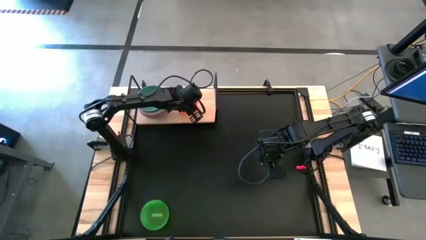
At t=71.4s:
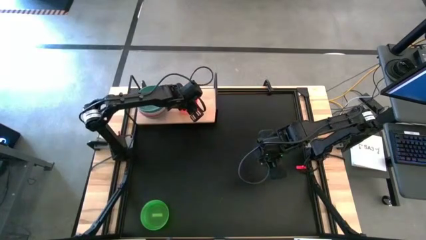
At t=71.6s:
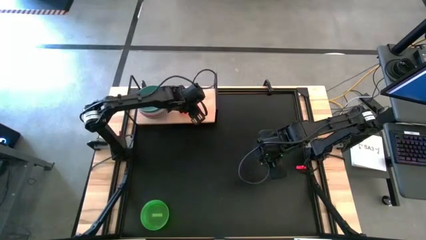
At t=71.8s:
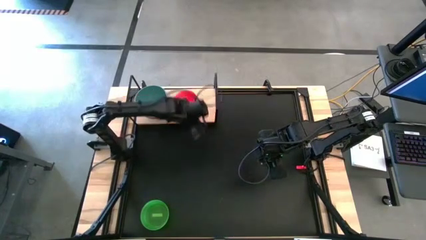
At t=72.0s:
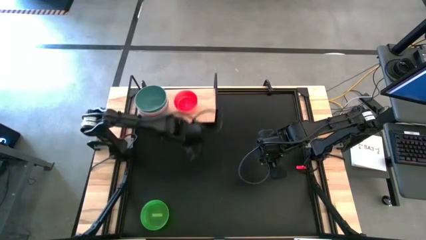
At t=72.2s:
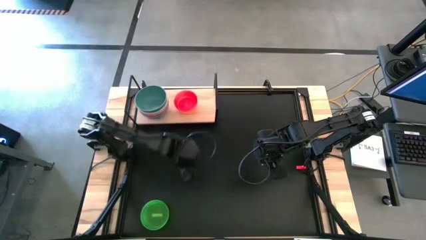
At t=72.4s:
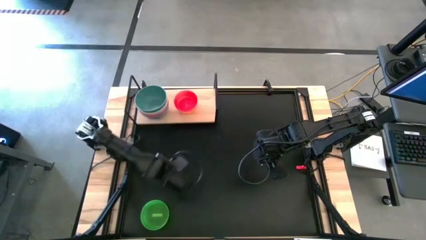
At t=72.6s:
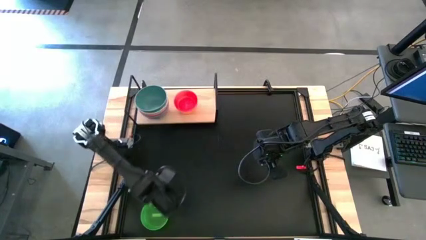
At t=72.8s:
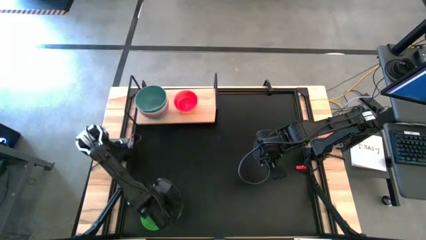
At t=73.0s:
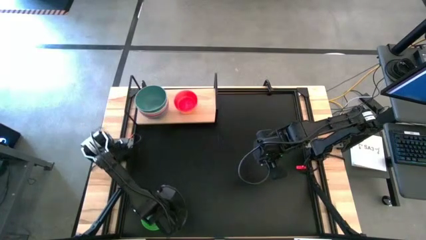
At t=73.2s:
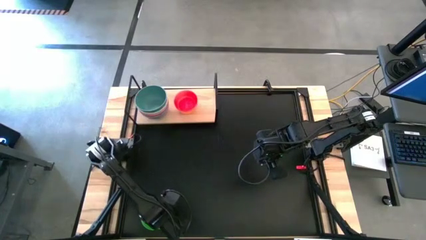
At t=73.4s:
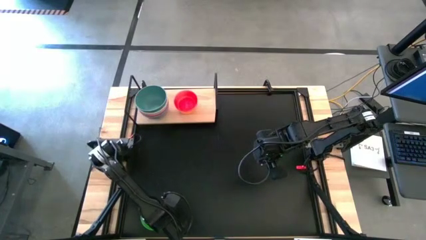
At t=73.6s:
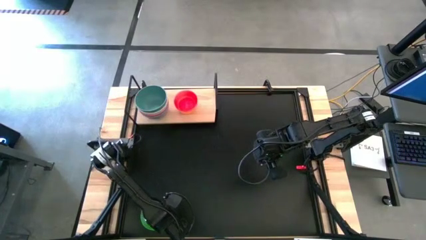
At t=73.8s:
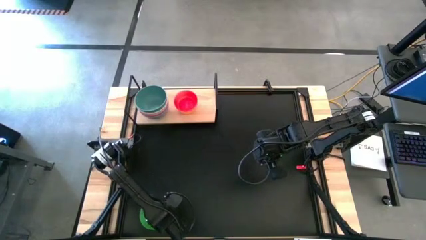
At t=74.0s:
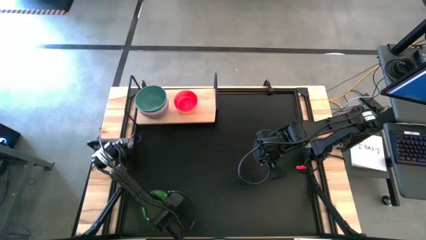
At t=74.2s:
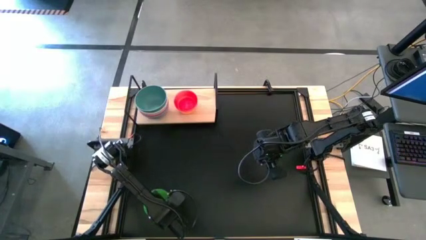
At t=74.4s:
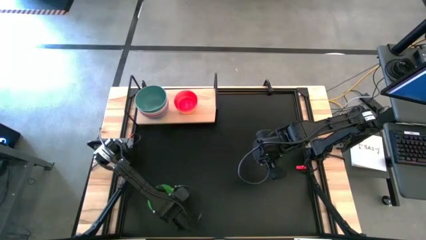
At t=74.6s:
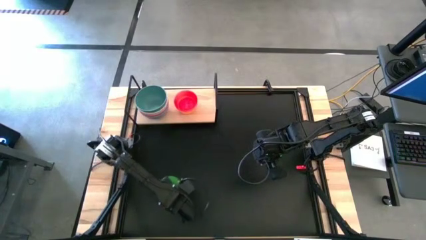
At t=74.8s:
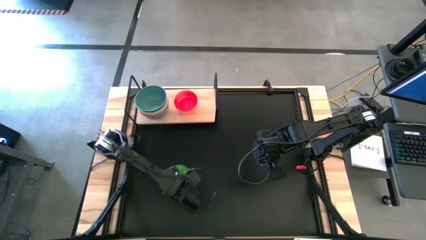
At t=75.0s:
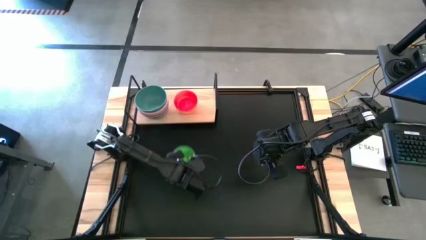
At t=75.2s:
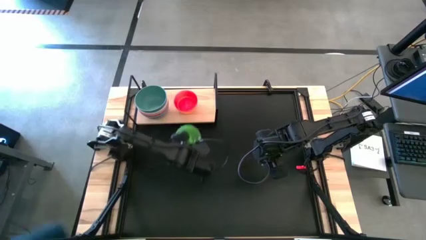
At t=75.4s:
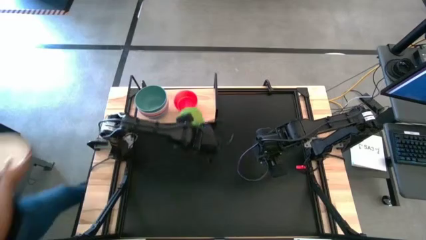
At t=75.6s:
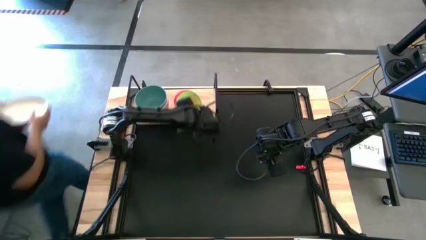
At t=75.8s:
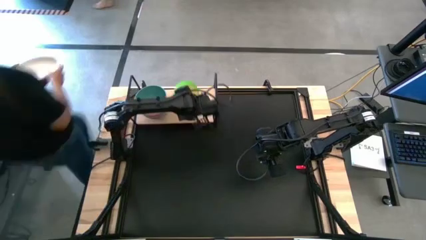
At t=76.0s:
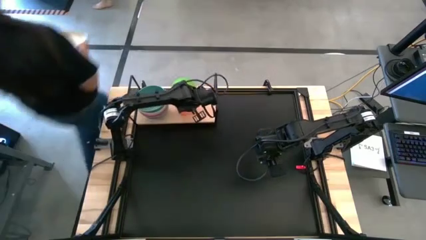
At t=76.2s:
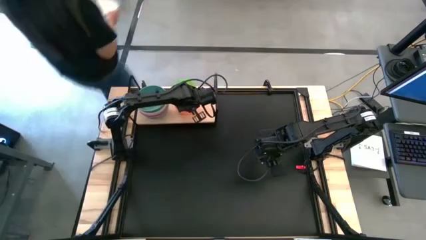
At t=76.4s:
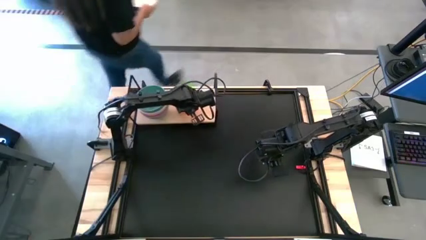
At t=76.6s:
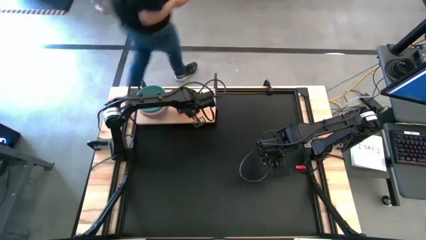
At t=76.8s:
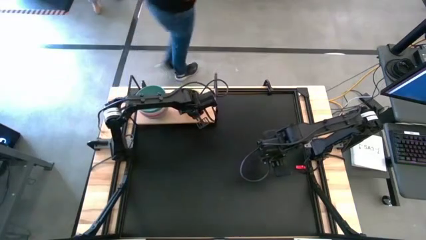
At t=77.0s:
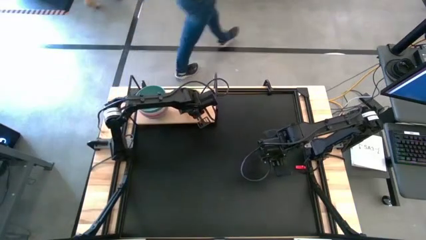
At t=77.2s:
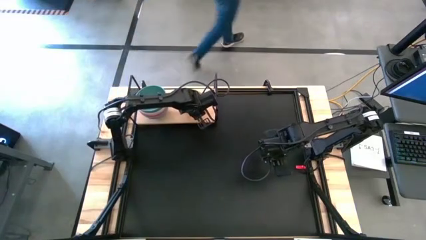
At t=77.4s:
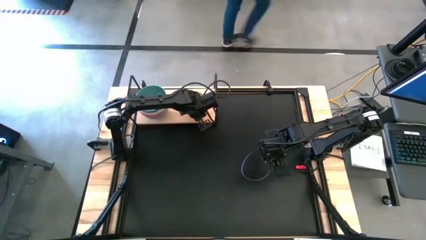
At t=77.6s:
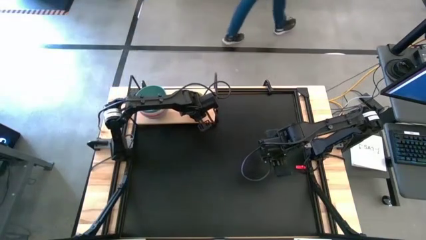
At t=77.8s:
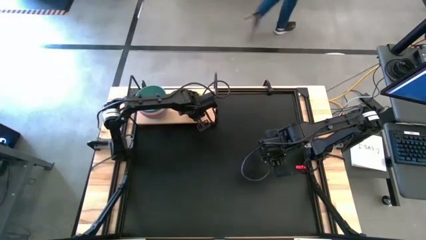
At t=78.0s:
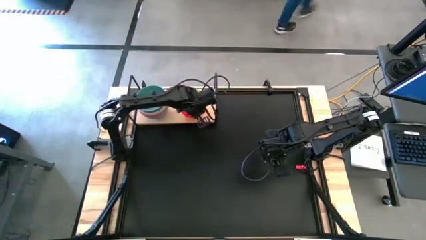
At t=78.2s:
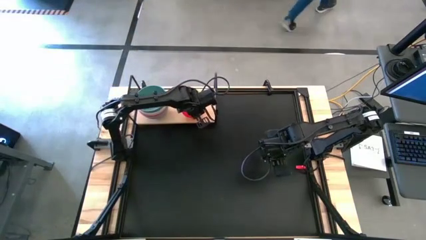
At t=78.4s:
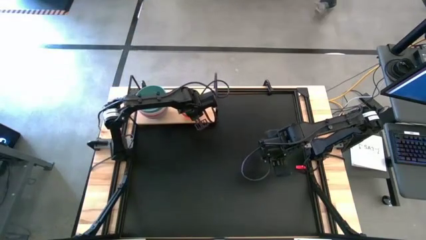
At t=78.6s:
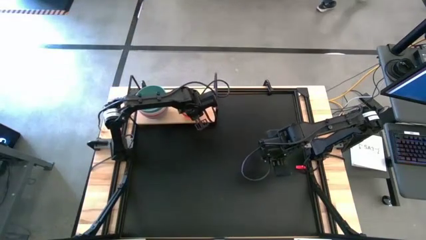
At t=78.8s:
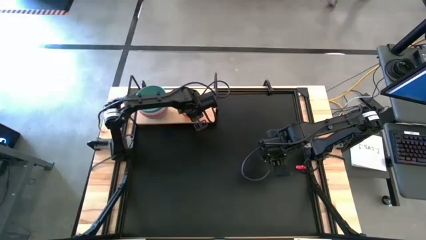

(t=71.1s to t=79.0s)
Task: Place and stack bowls onto a shelf
Stack the green bowl on top of the red bowl on the shelf

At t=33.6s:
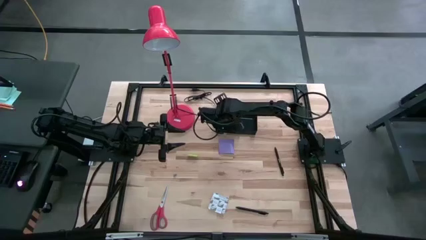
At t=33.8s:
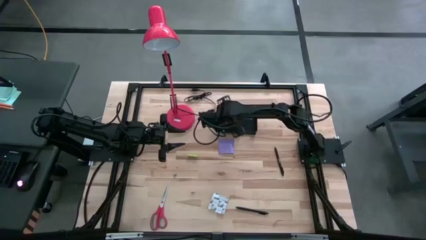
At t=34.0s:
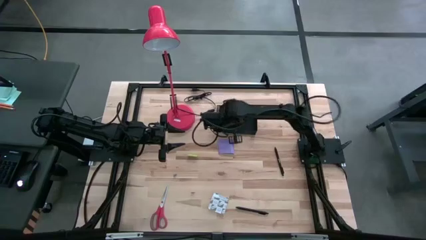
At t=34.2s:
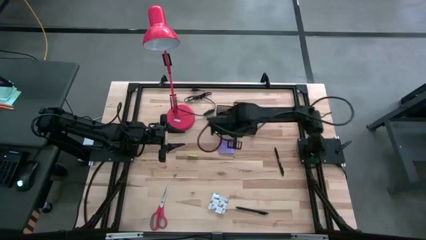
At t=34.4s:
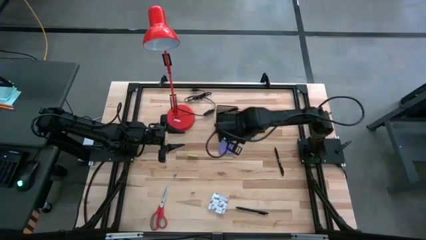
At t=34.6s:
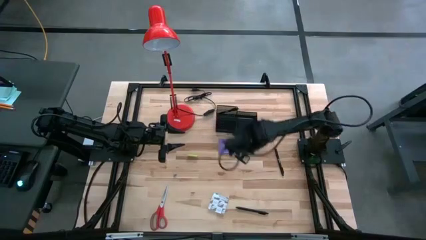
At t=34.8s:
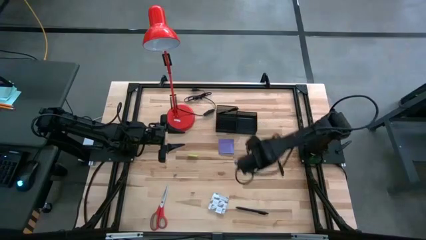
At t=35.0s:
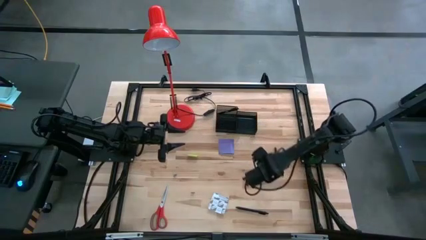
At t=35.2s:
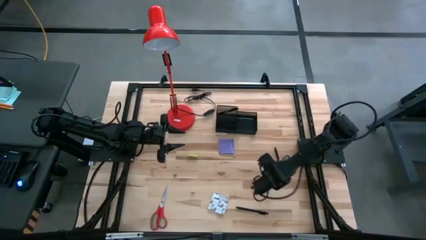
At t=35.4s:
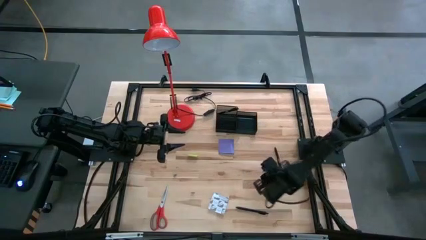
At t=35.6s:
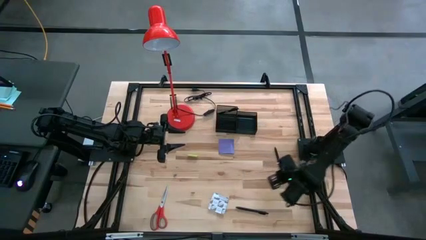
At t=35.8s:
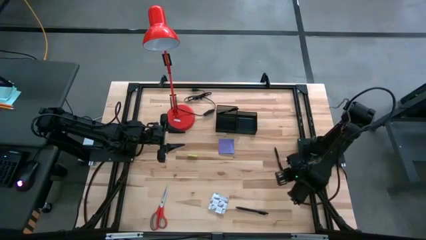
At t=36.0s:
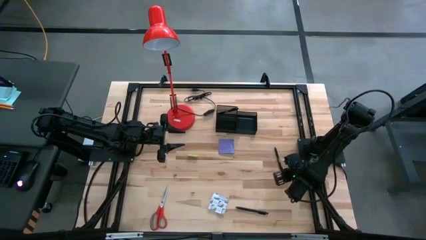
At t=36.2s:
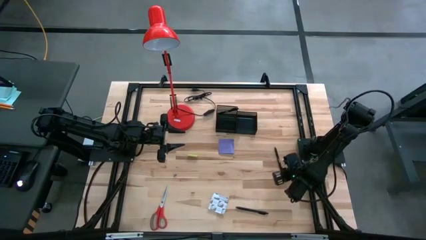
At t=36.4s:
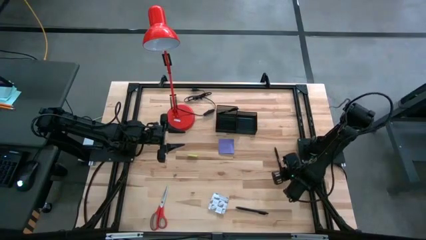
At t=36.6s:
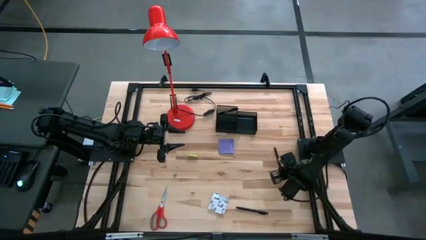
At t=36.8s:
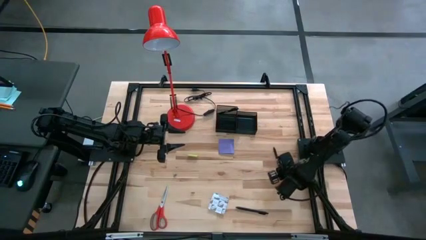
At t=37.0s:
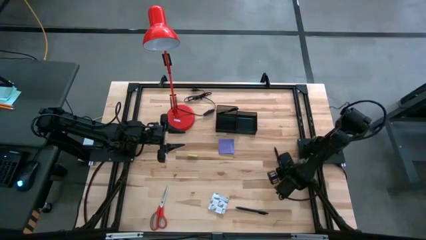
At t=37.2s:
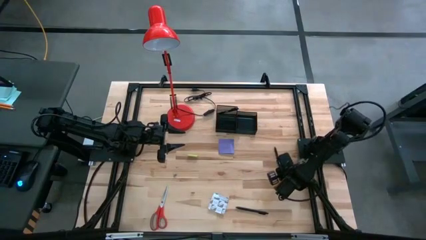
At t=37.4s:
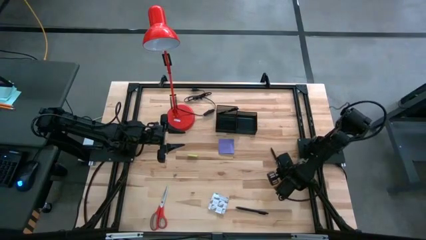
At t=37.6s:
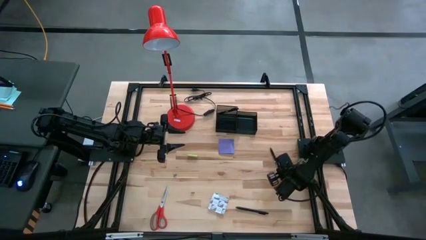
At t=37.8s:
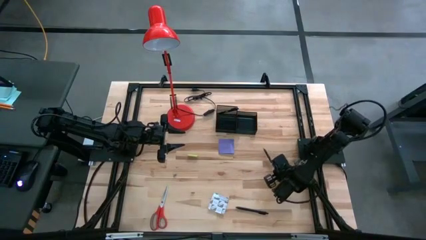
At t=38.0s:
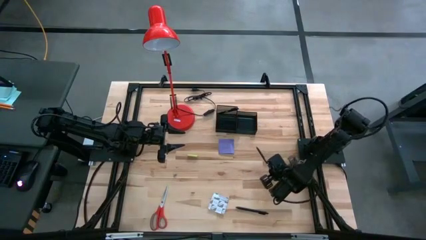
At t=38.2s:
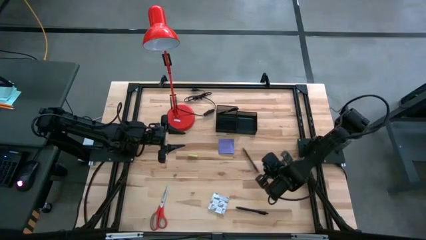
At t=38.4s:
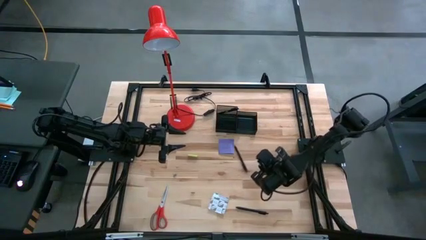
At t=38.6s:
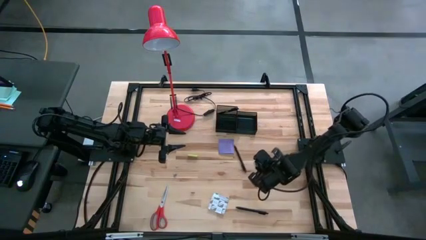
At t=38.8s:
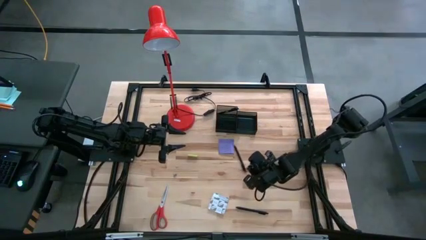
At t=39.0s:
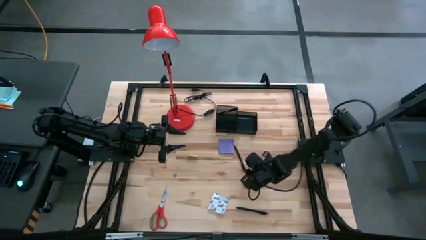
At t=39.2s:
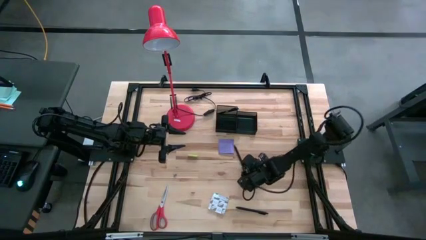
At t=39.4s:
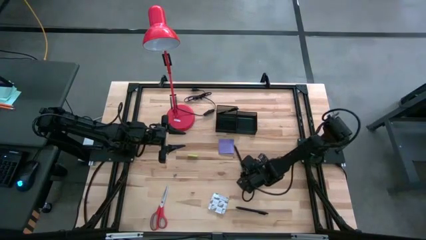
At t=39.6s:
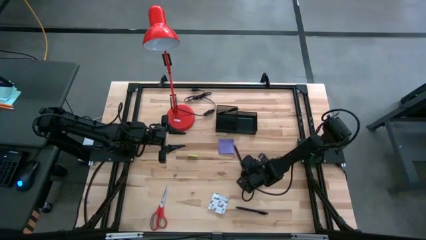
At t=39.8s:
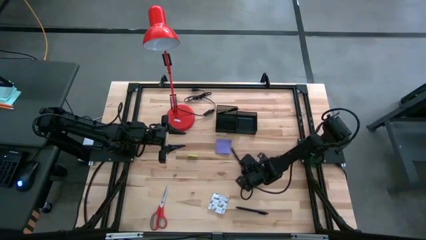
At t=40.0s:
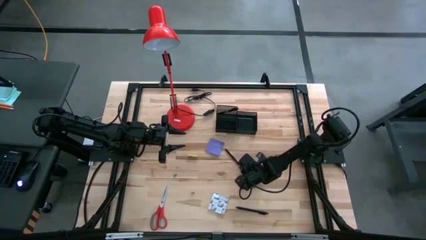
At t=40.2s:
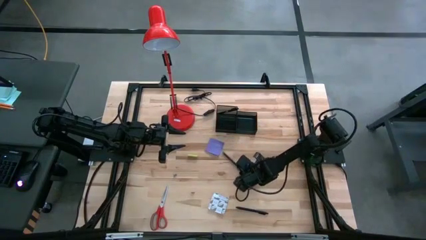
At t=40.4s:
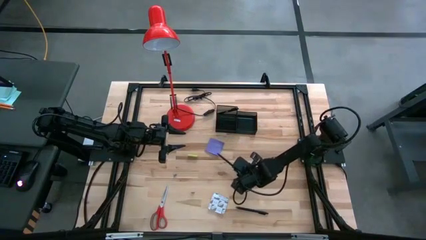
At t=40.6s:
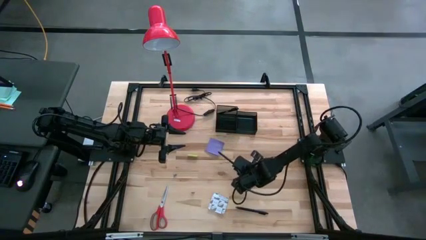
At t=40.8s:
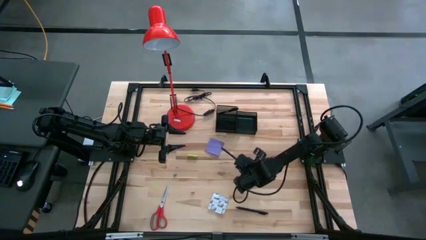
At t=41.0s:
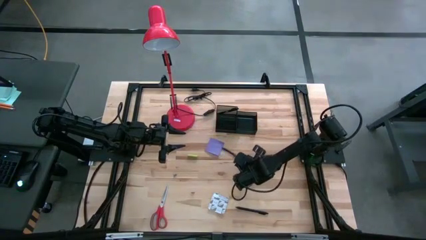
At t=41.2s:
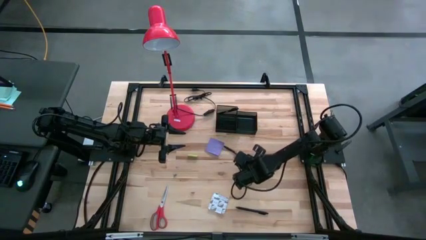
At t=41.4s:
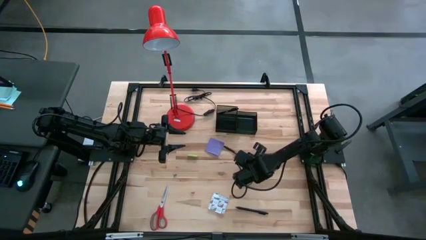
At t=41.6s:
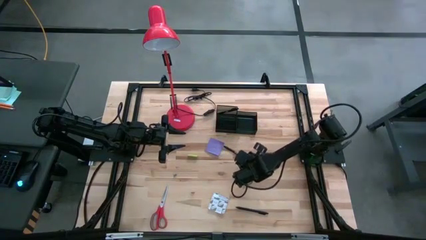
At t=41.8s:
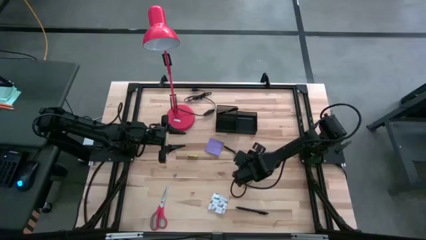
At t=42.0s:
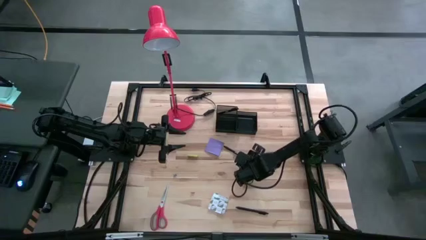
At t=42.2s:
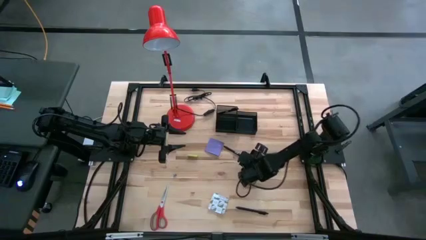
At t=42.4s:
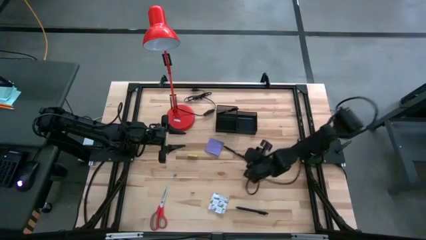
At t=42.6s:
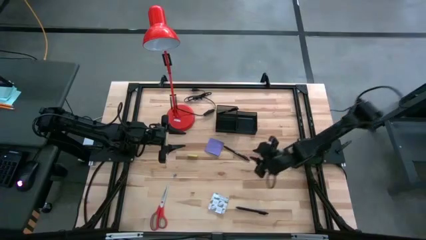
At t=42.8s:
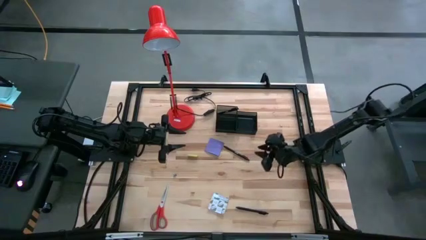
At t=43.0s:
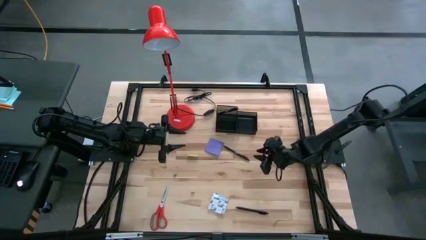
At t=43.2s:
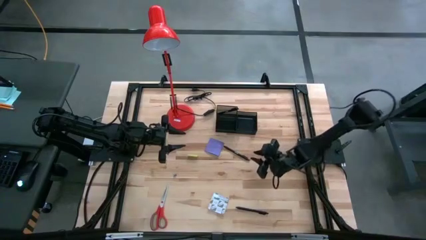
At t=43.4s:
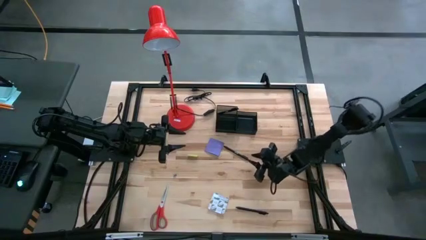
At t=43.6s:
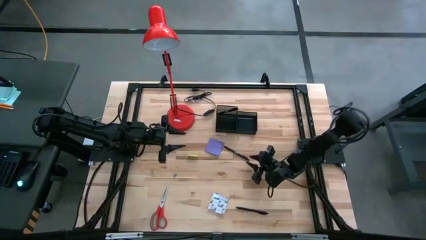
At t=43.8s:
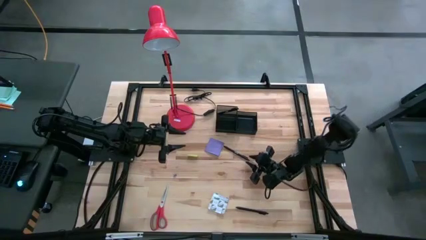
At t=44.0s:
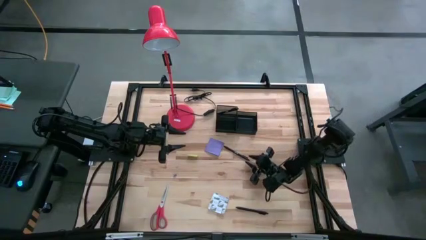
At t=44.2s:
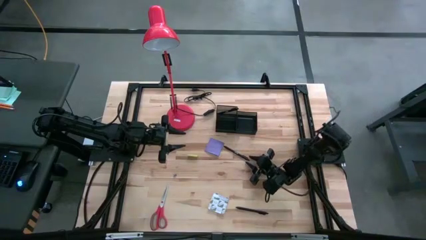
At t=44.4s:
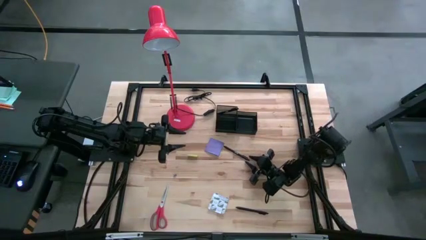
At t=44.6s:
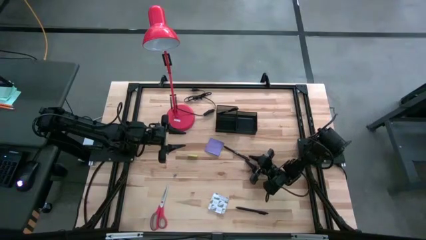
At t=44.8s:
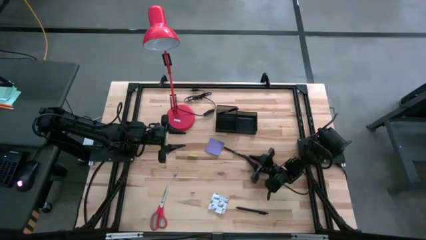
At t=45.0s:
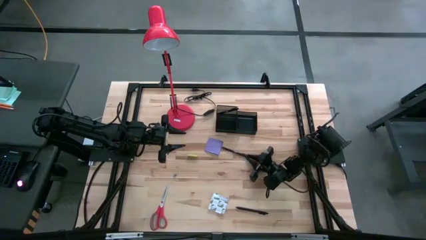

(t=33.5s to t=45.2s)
Task: Pick and place office supplies into organizer
Put the black pen into the black desk organizer
